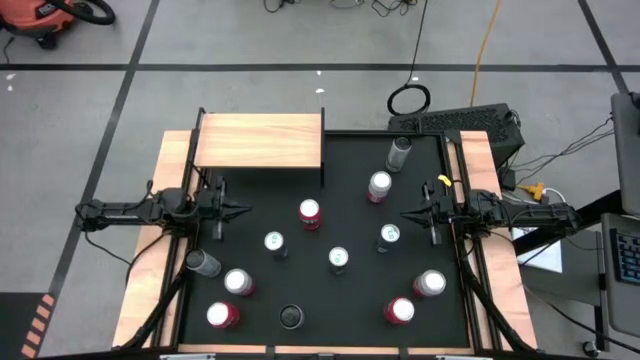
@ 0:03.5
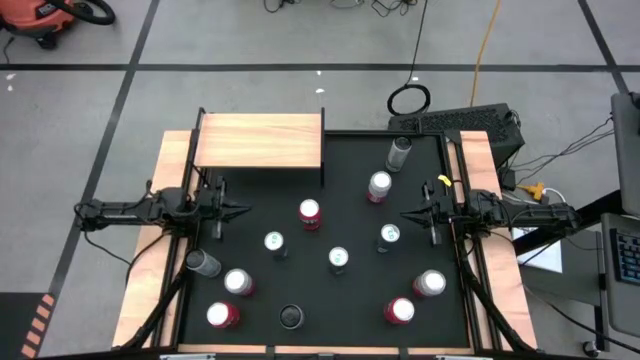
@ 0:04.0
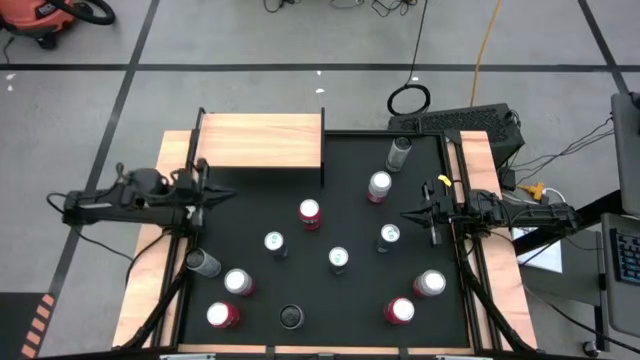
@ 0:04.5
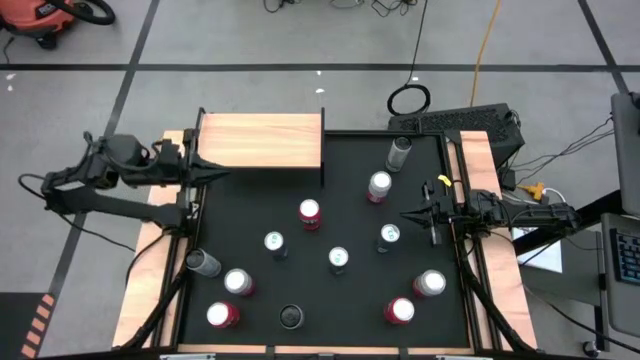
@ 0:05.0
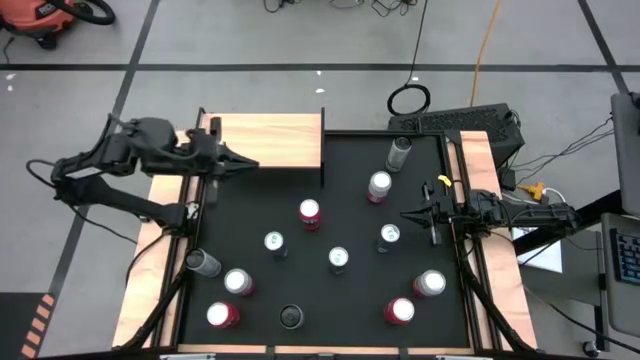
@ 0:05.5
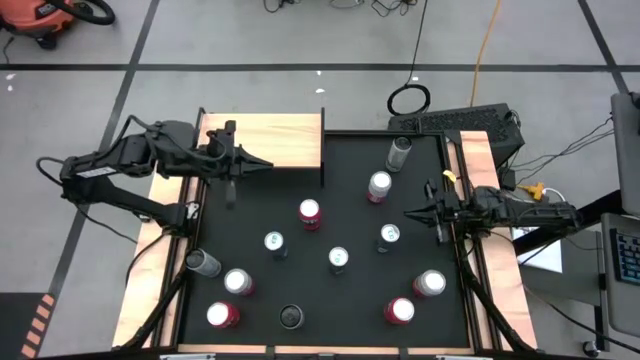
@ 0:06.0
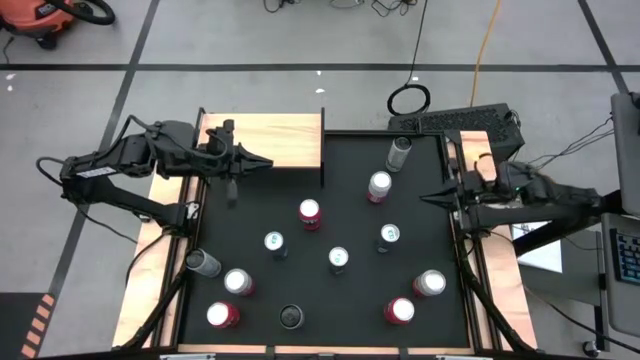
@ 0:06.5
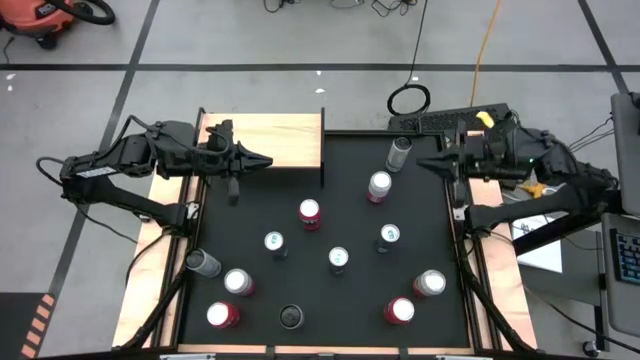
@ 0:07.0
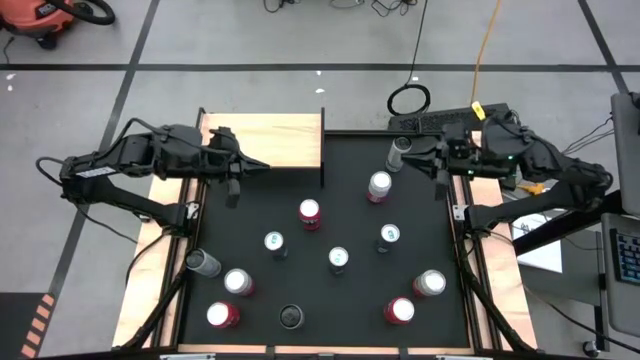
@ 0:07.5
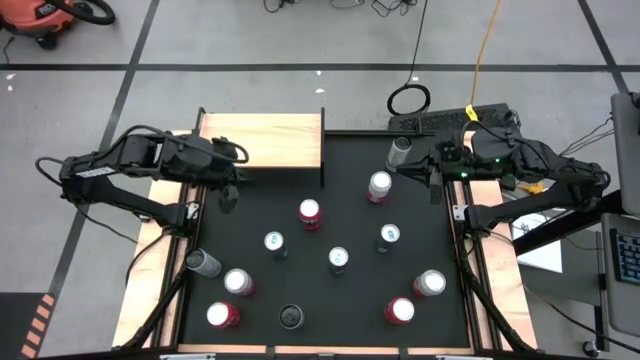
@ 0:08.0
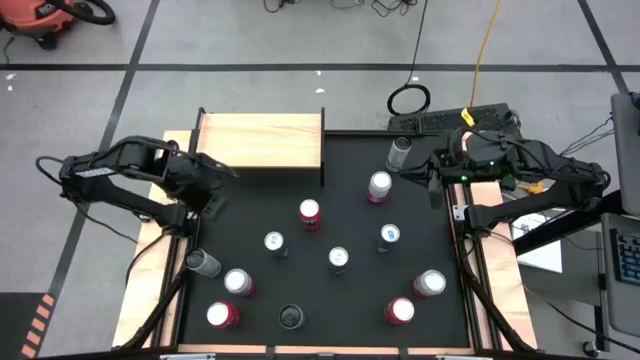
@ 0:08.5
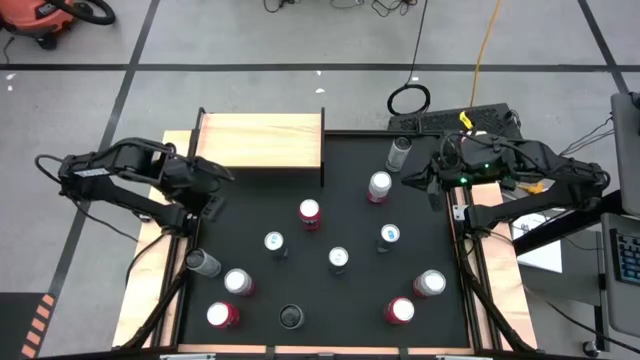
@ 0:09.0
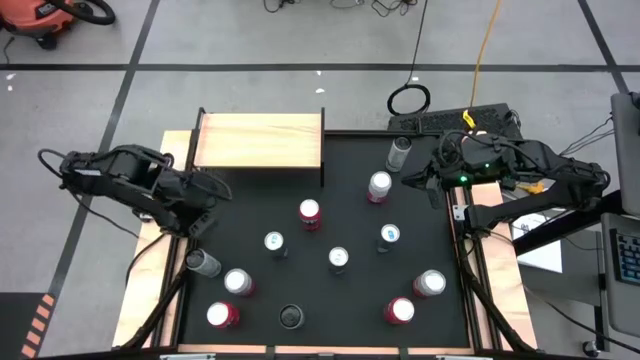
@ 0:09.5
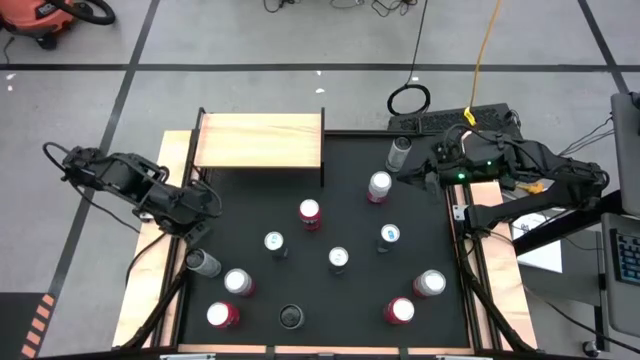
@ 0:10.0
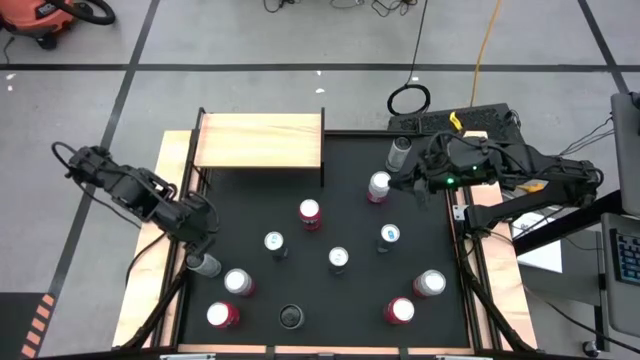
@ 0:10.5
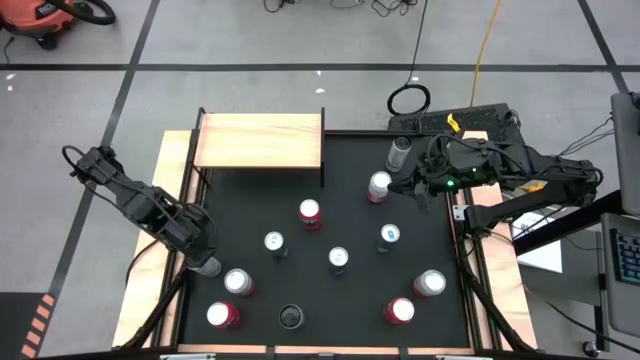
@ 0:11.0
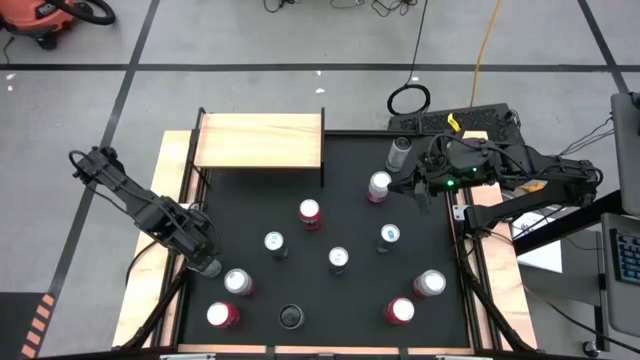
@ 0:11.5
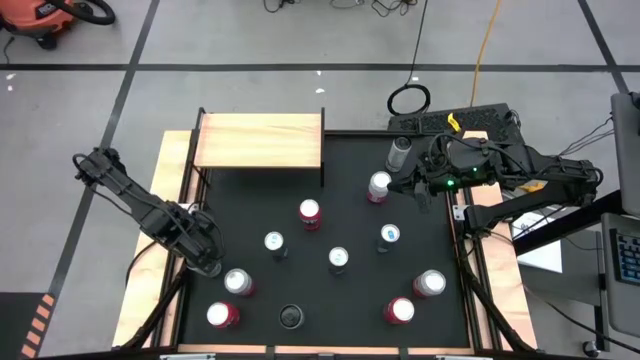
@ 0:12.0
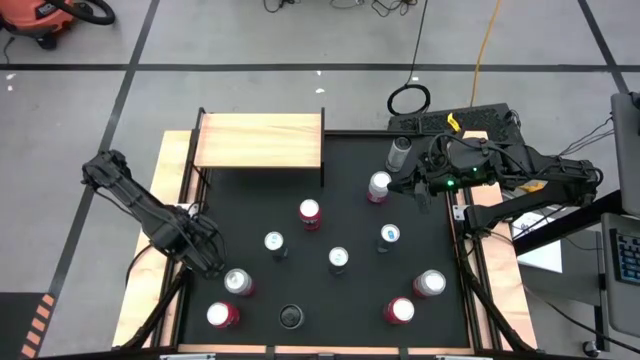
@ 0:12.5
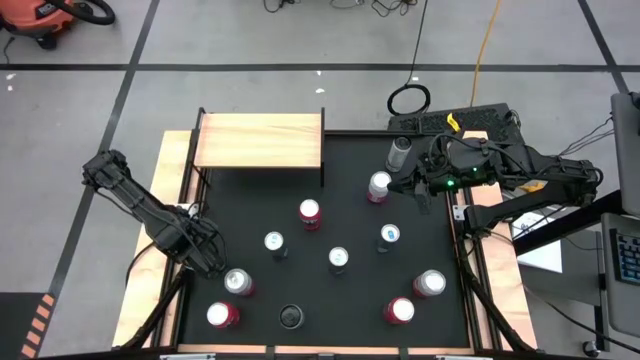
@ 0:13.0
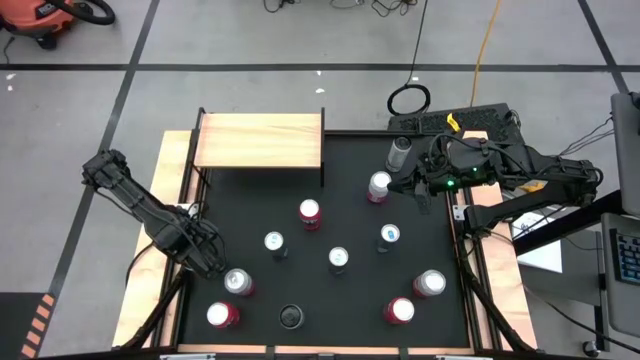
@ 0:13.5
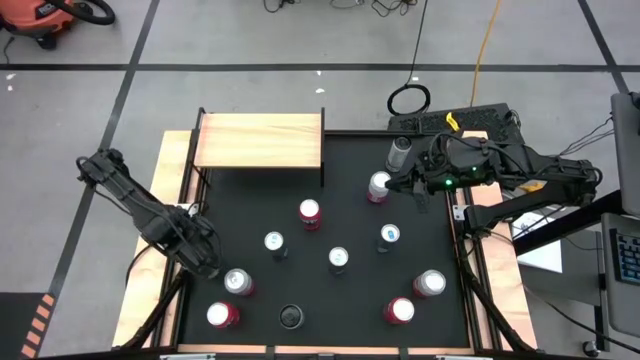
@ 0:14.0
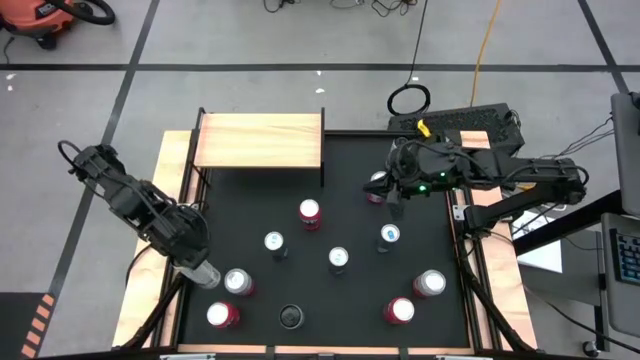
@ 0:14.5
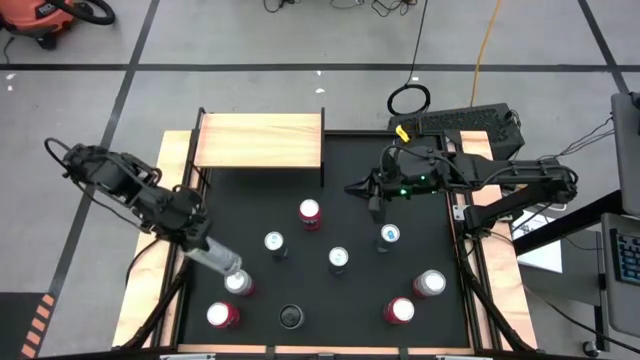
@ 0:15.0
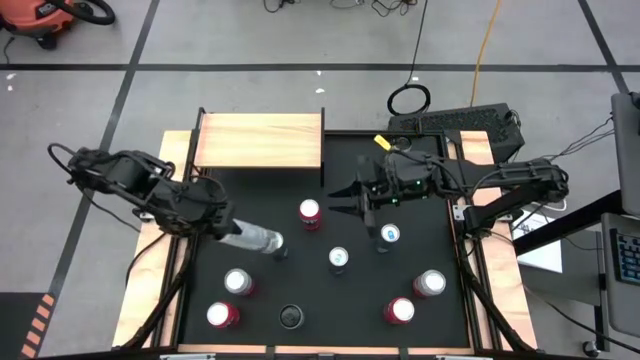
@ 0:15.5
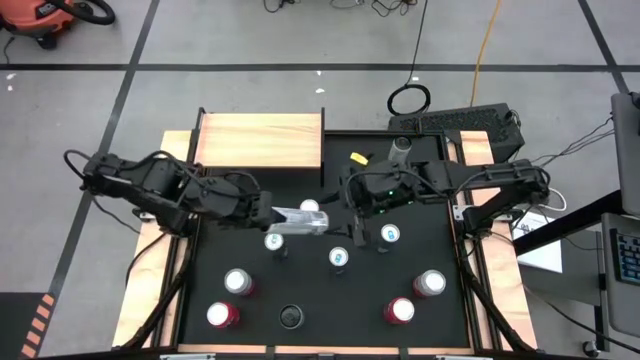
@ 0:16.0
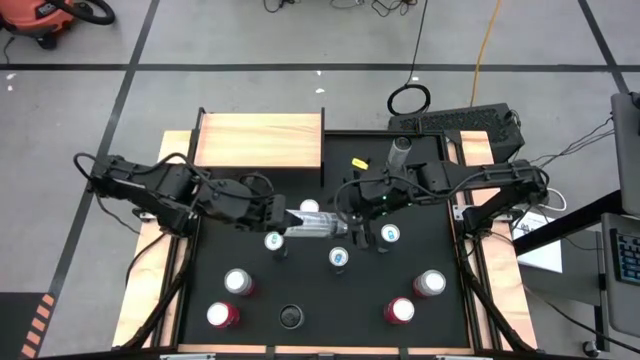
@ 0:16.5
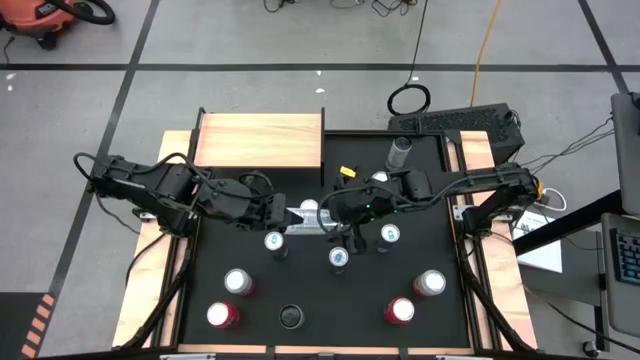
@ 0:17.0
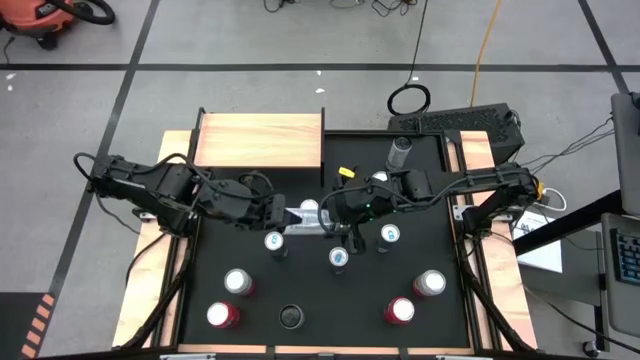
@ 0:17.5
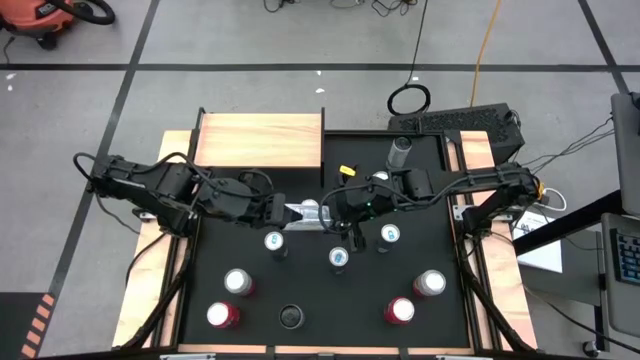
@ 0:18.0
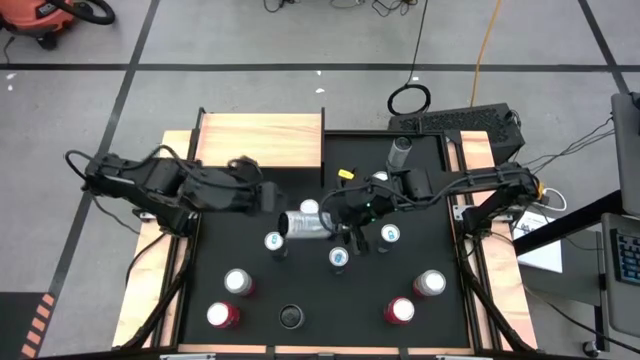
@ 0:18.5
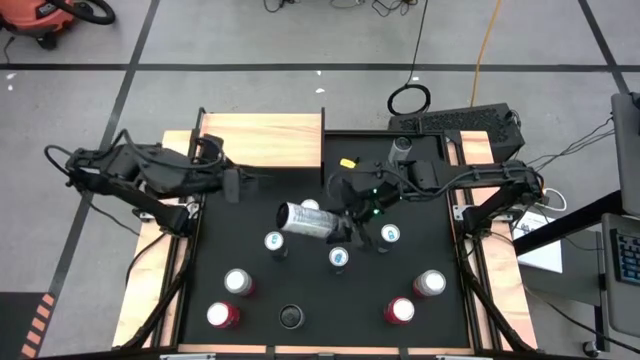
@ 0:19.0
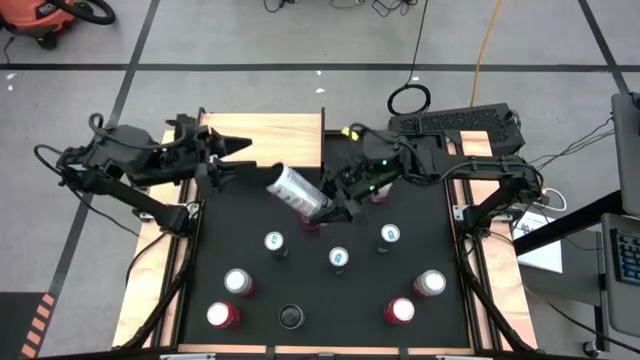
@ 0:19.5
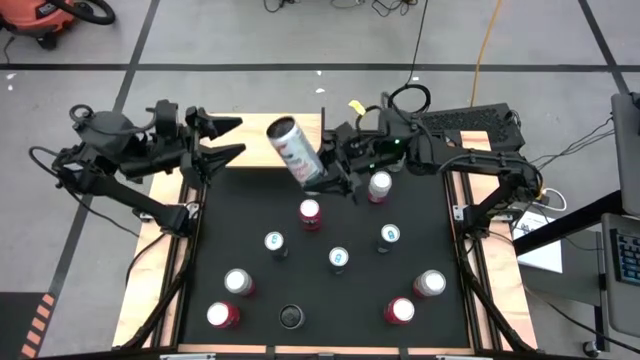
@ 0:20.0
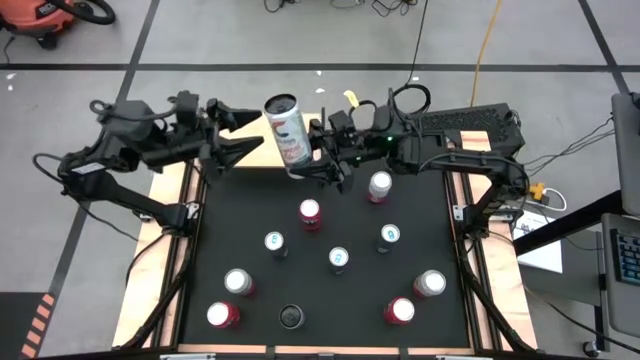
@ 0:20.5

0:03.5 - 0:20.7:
Task: Place canned beverage on shelf
Put the middle white yellow soda can on the shelf
